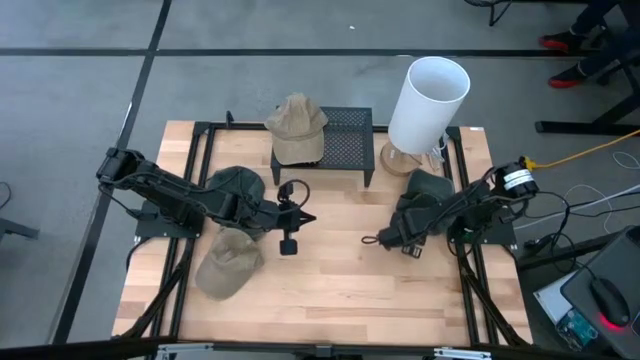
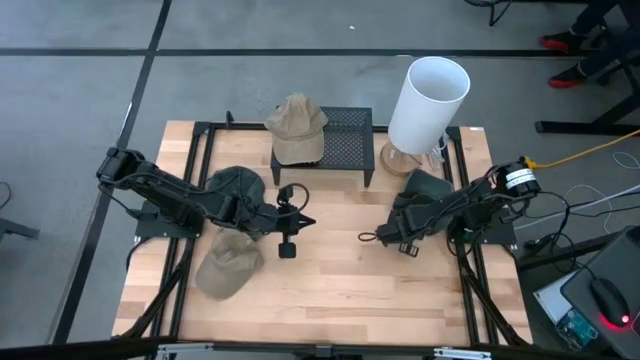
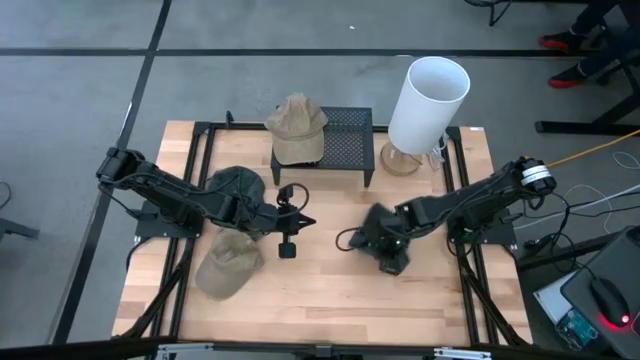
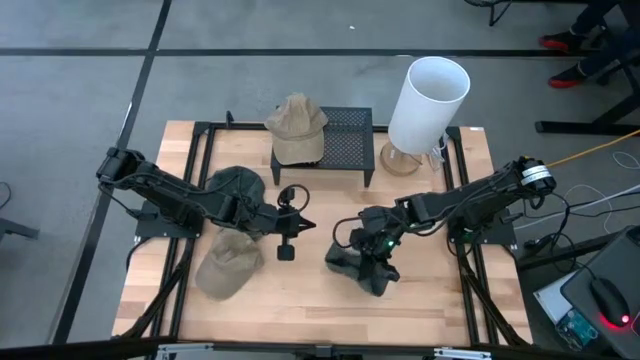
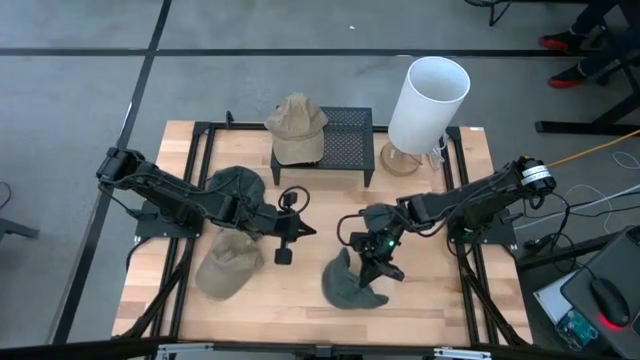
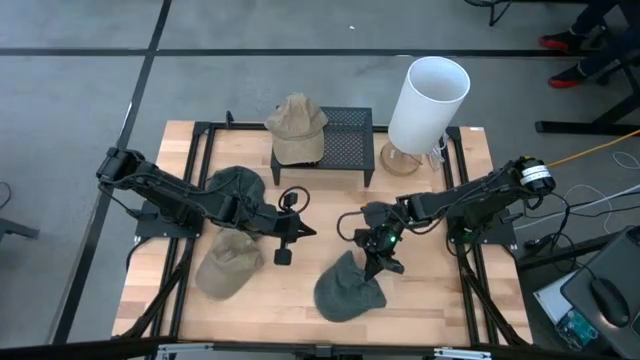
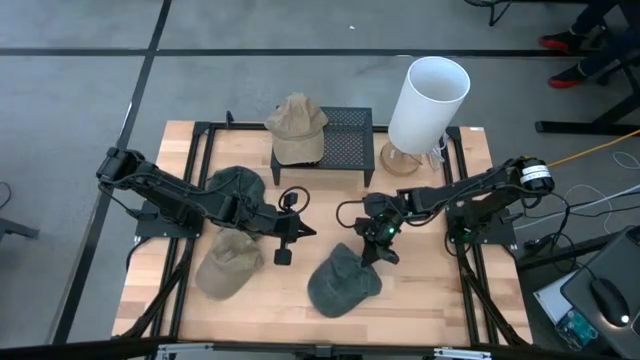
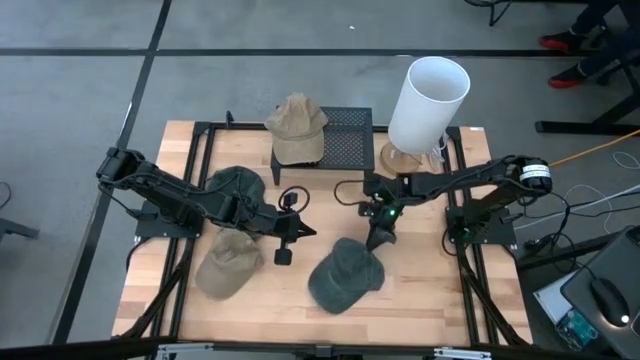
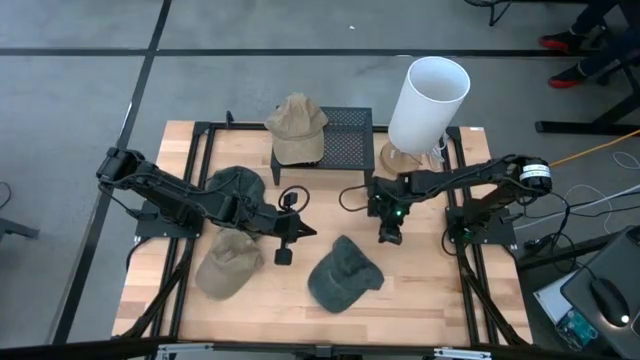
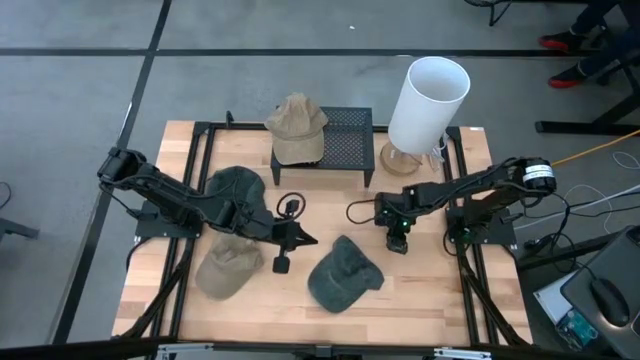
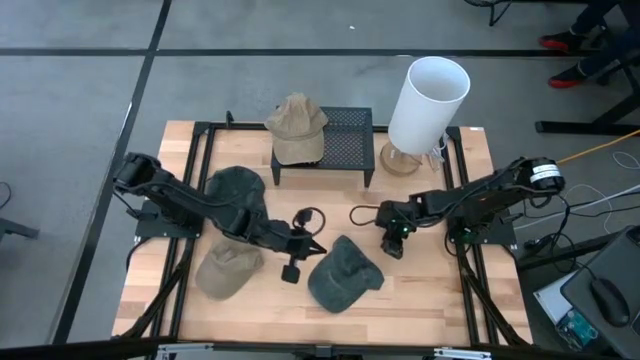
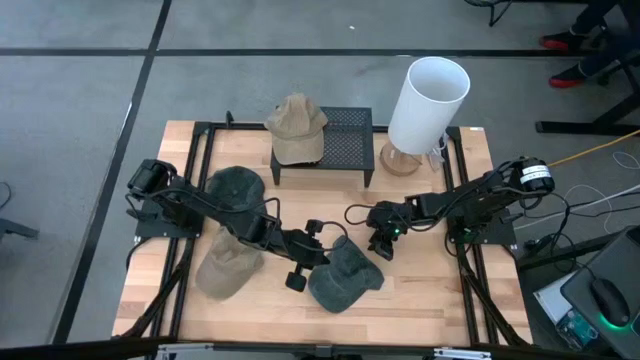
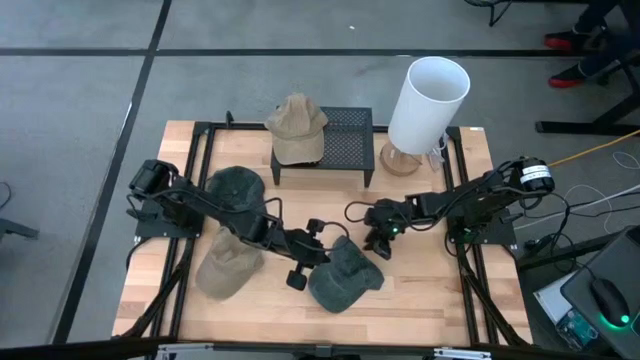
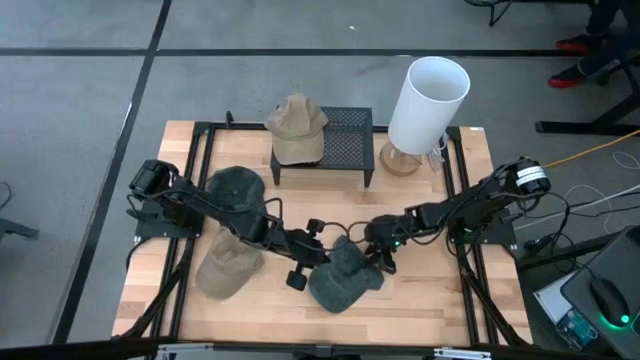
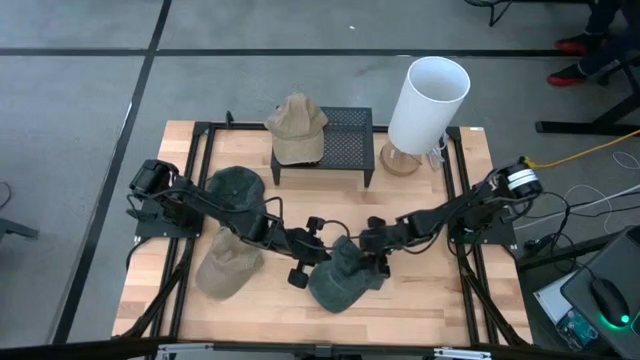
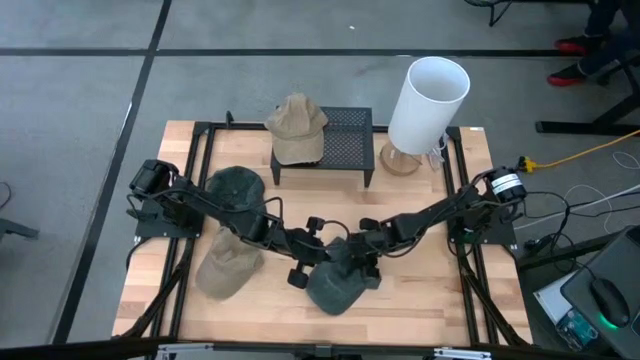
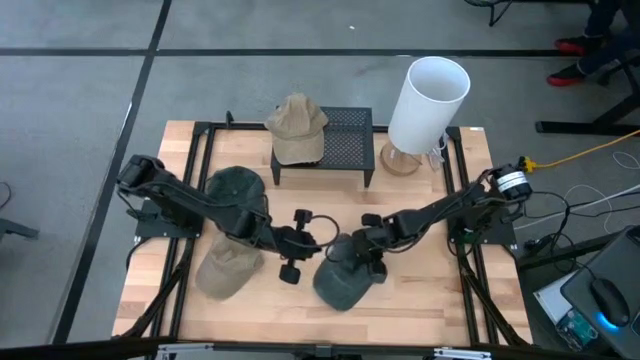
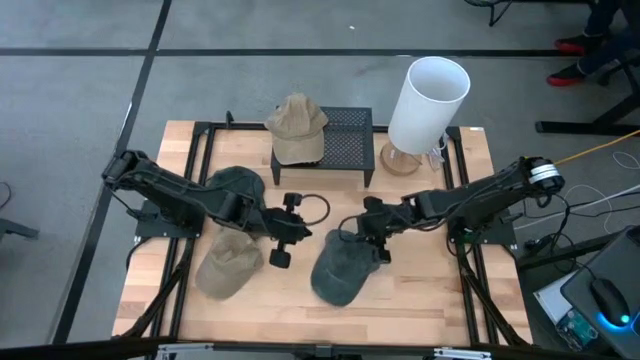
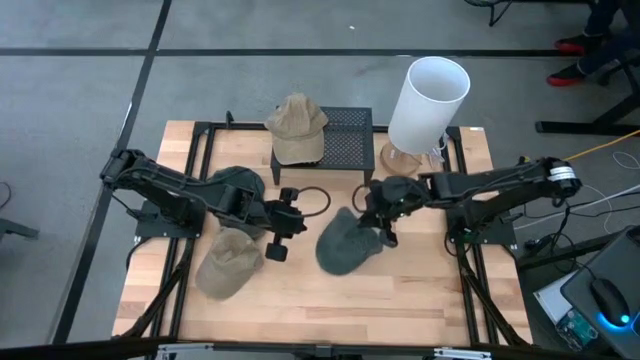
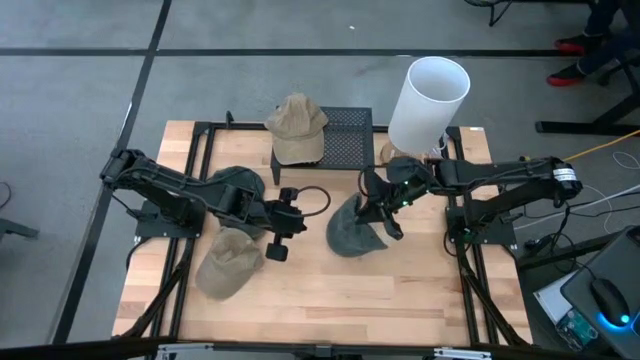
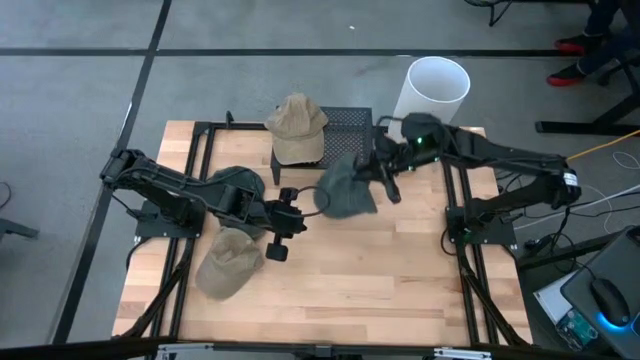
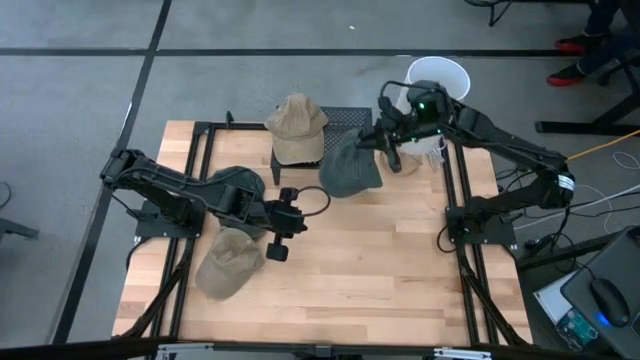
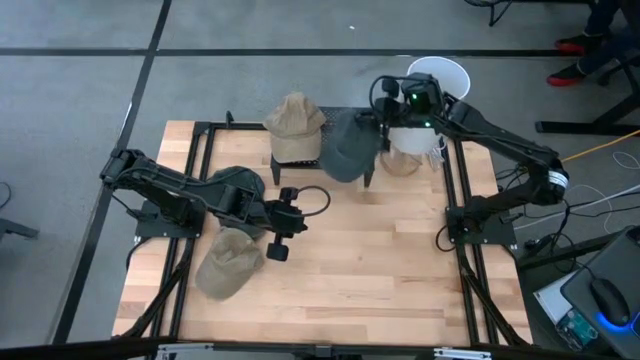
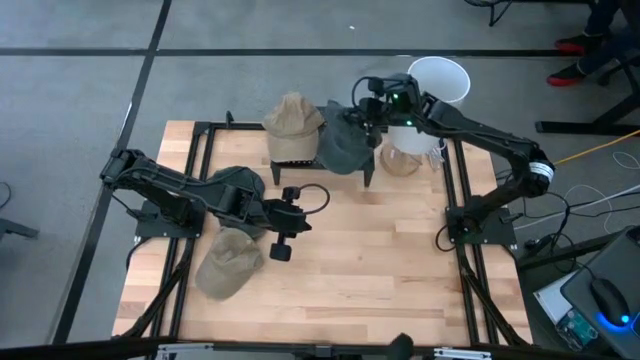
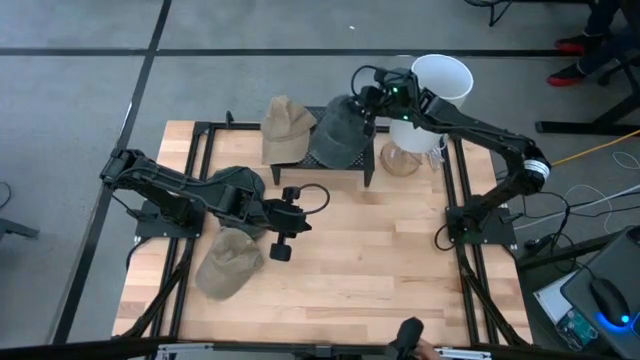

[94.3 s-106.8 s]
Task: Pick & Place hat
Put the right dark green cap on the shelf

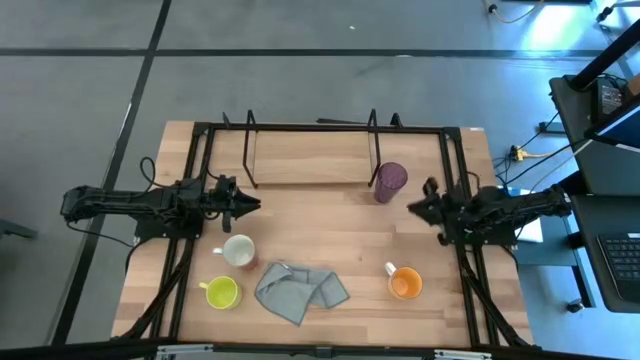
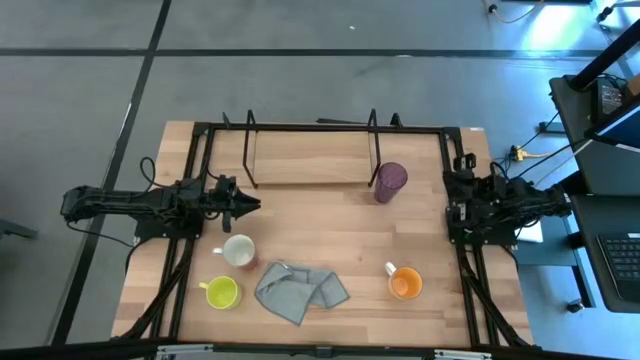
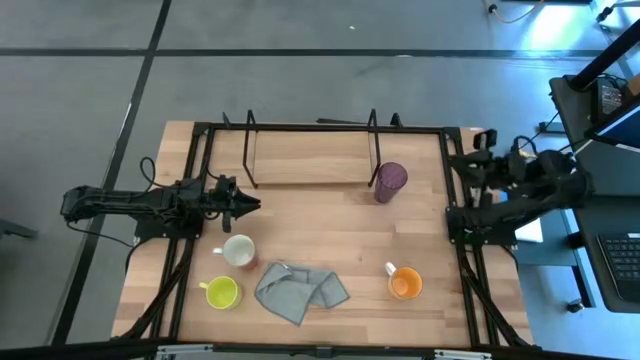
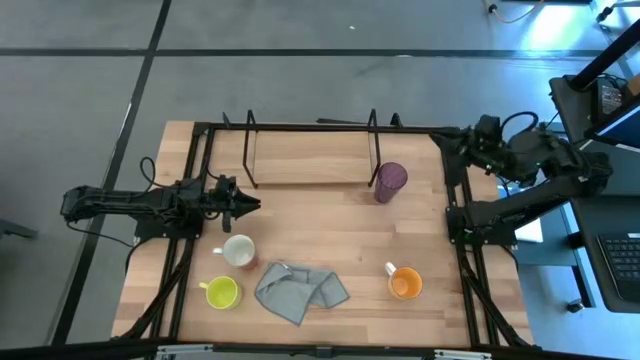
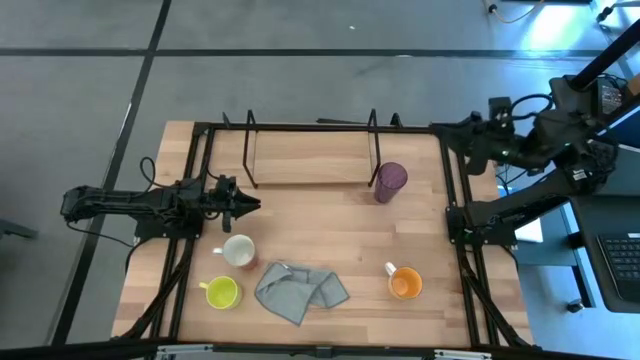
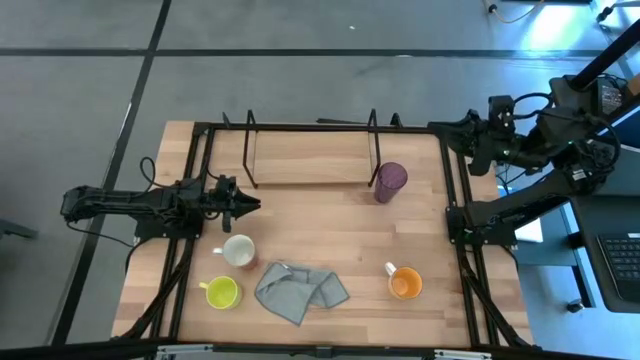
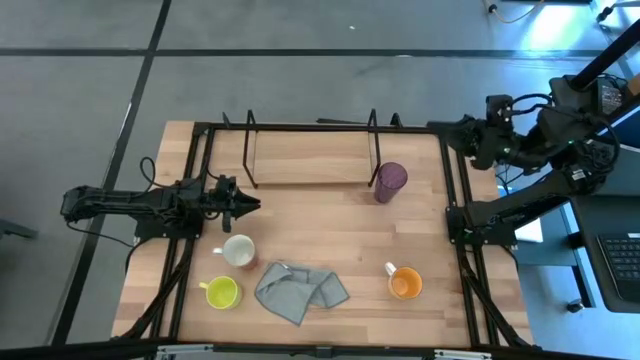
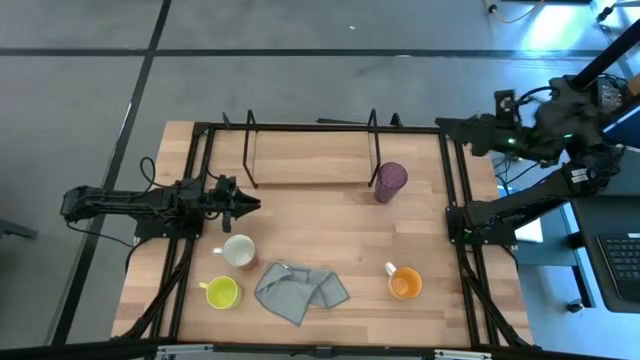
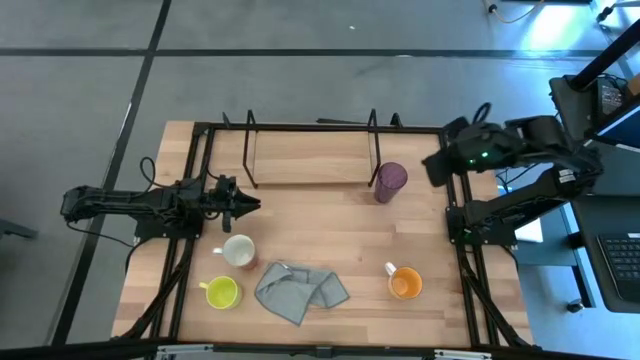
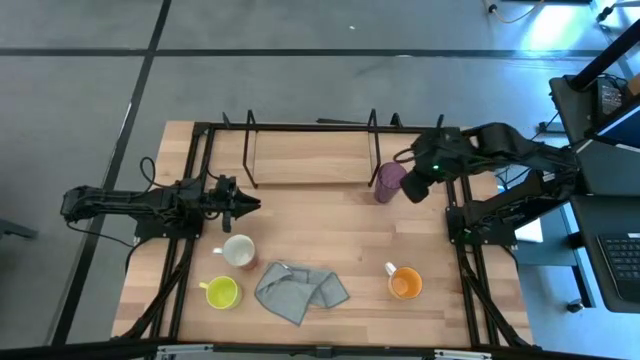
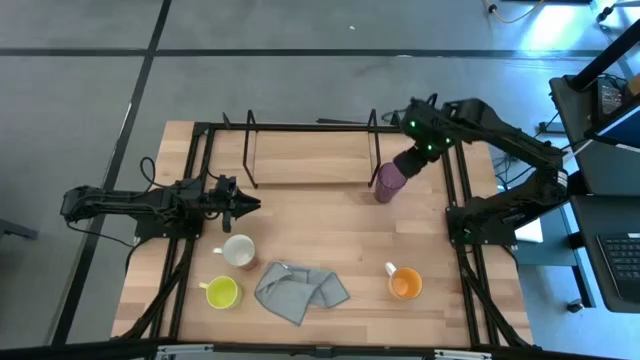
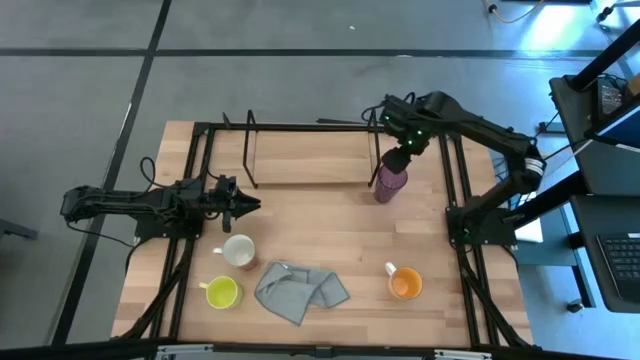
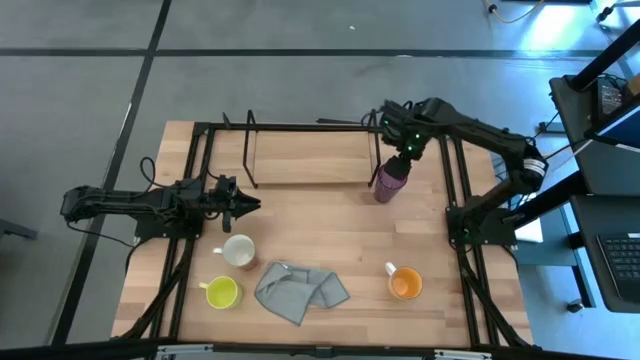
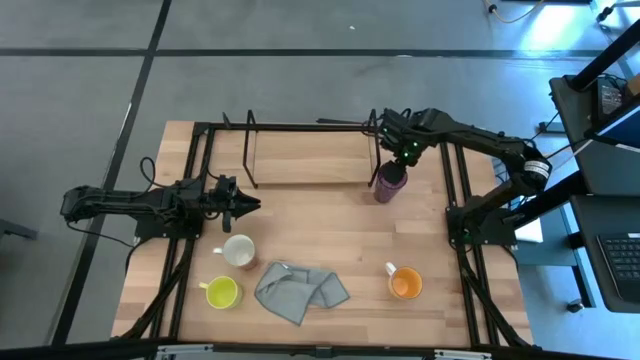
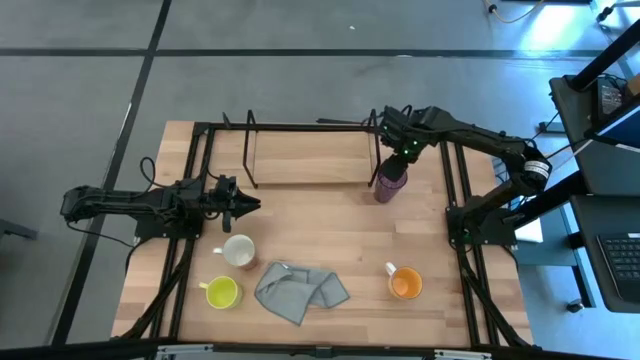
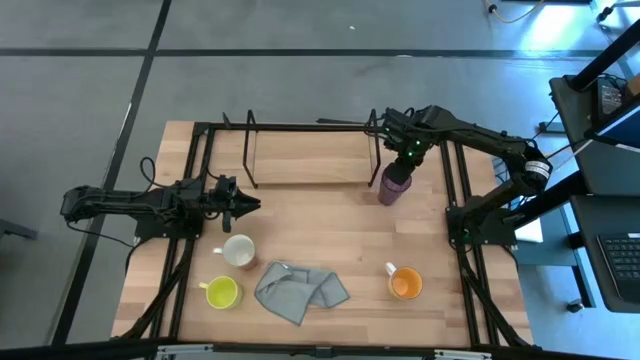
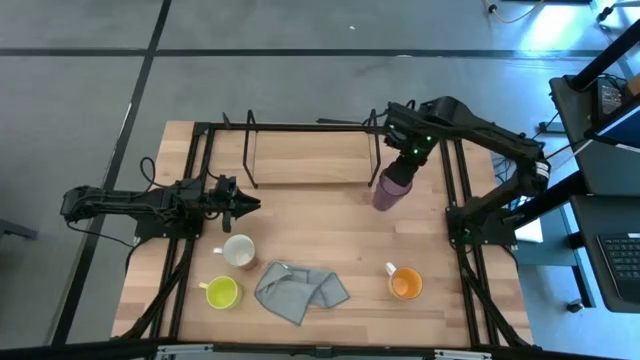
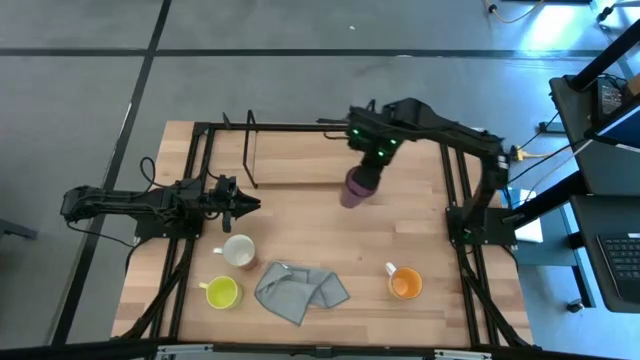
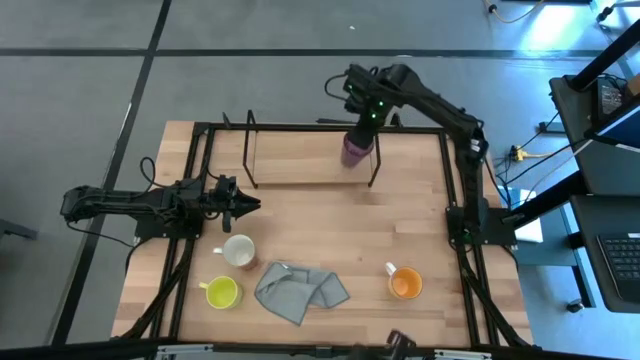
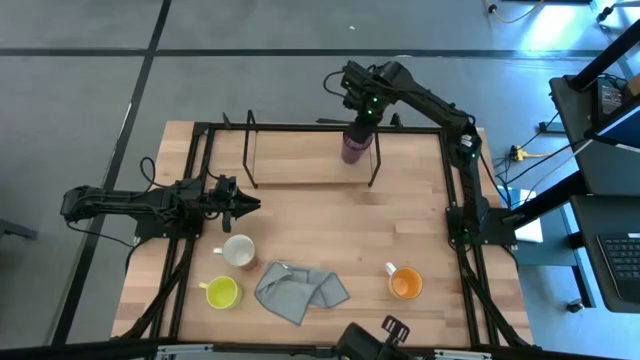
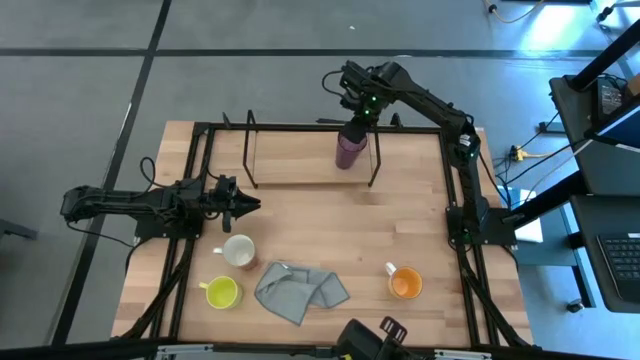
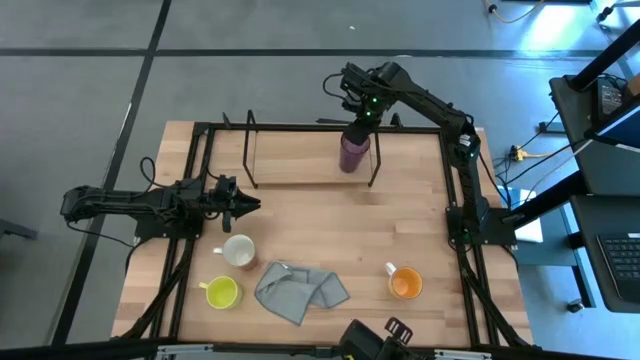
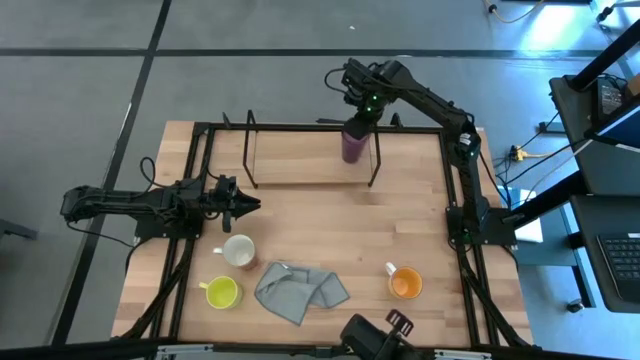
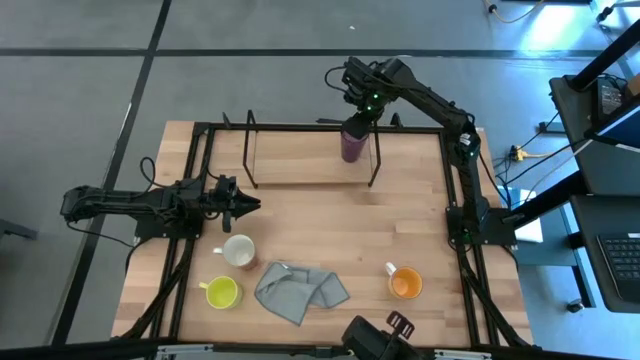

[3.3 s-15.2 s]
Task: Stack small to large cups/mugs on shelf
Put the violet cup on the shelf
